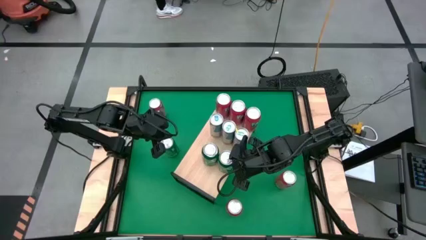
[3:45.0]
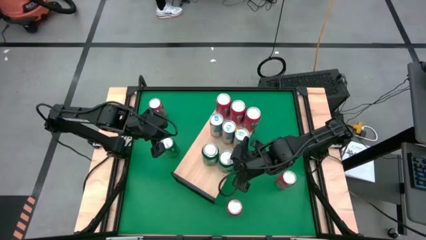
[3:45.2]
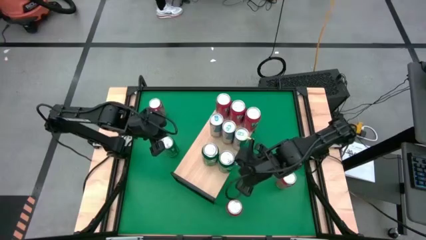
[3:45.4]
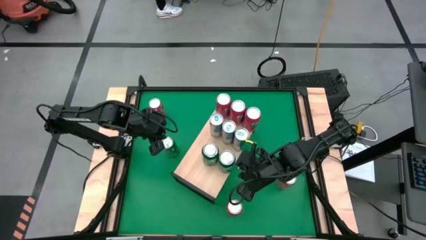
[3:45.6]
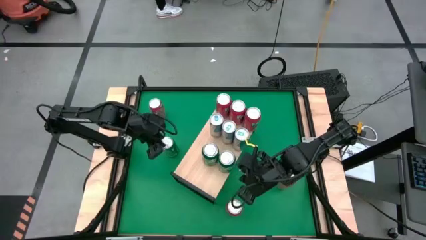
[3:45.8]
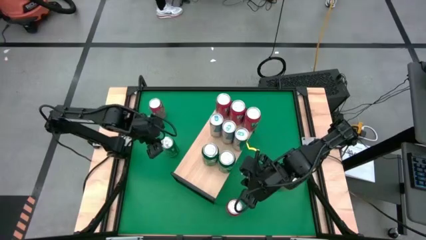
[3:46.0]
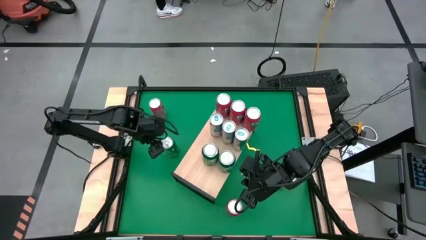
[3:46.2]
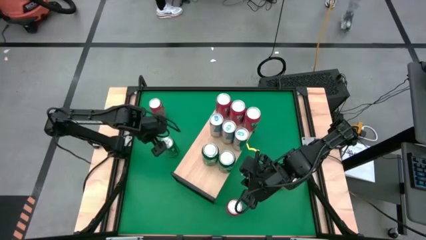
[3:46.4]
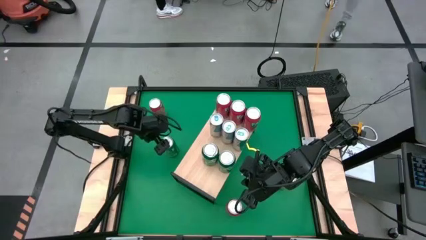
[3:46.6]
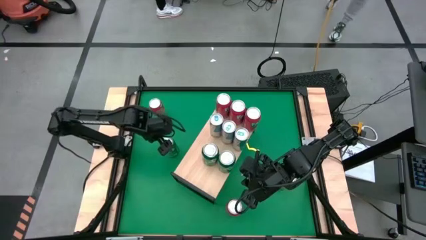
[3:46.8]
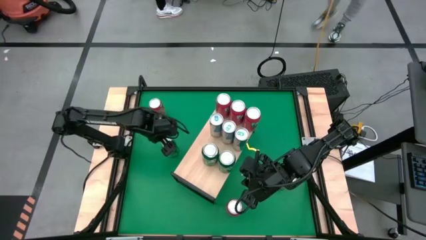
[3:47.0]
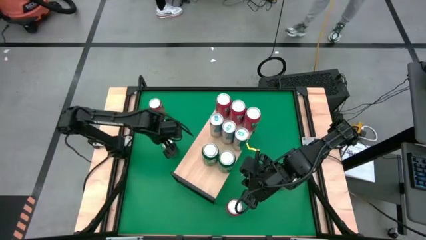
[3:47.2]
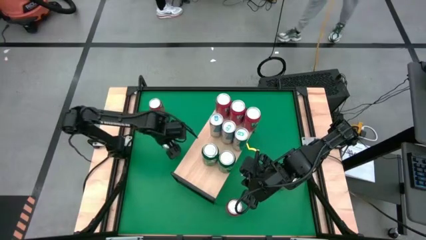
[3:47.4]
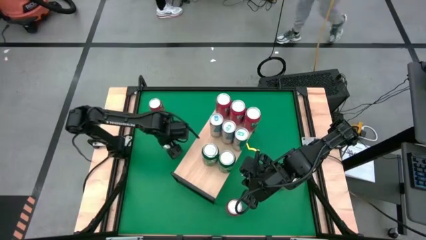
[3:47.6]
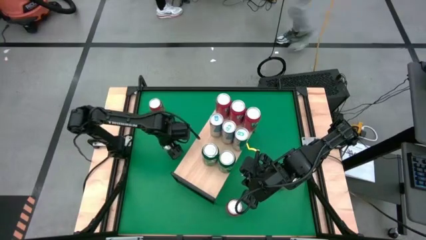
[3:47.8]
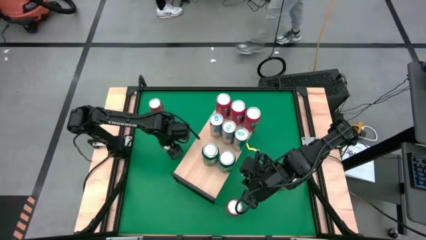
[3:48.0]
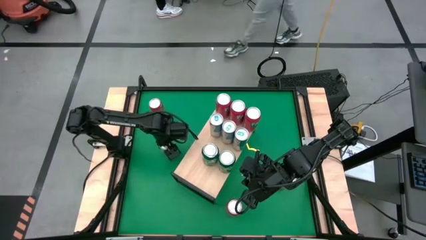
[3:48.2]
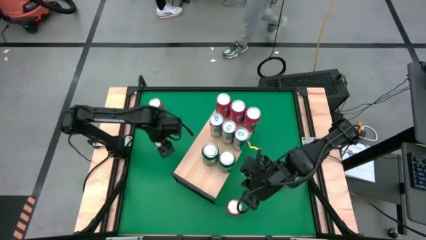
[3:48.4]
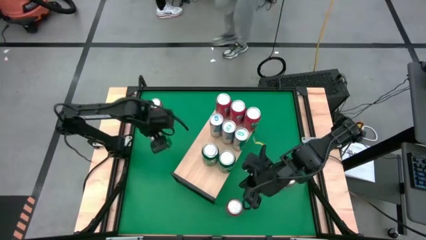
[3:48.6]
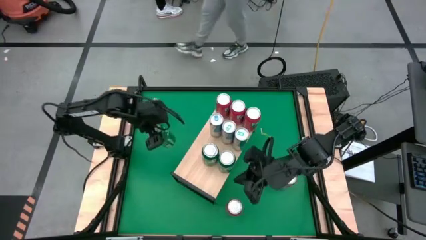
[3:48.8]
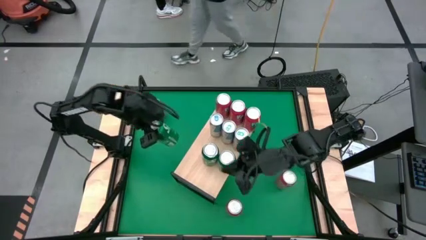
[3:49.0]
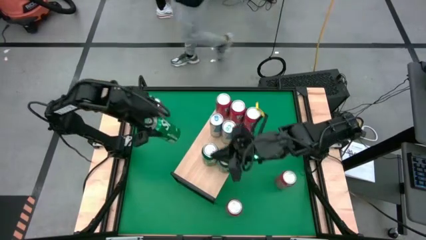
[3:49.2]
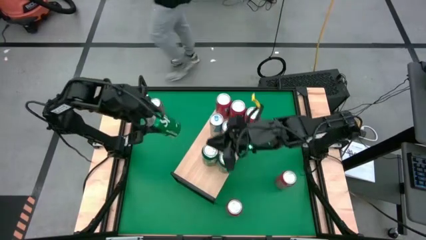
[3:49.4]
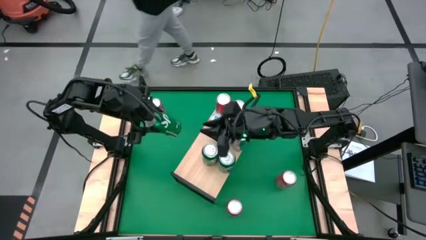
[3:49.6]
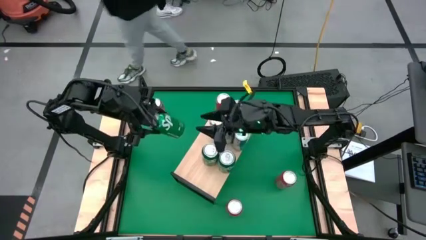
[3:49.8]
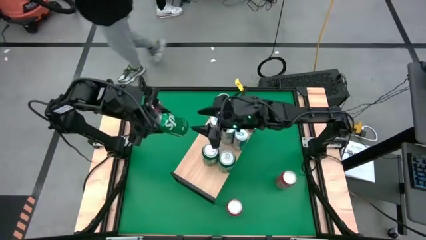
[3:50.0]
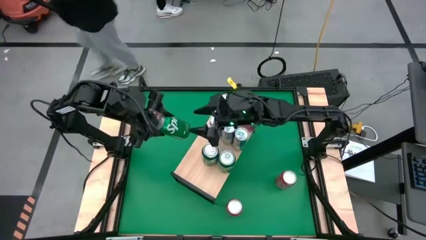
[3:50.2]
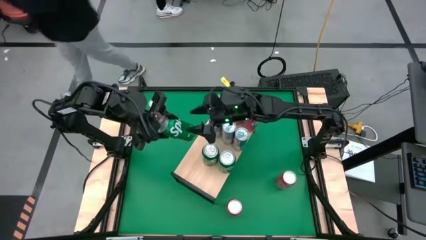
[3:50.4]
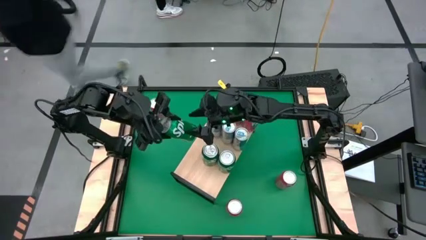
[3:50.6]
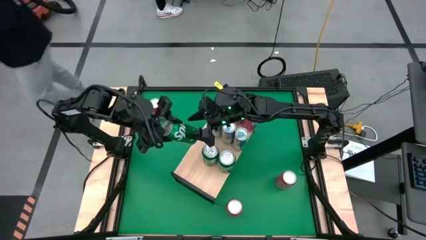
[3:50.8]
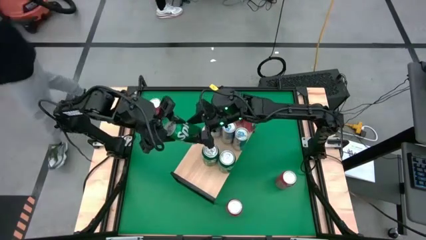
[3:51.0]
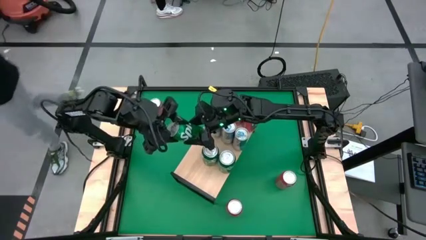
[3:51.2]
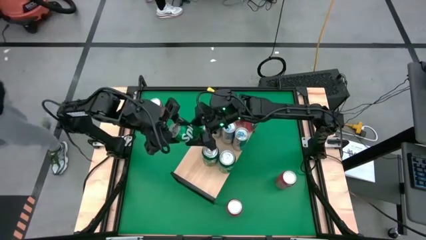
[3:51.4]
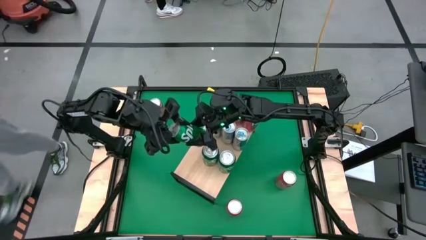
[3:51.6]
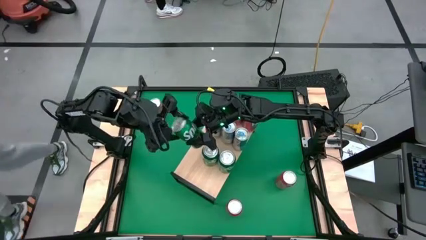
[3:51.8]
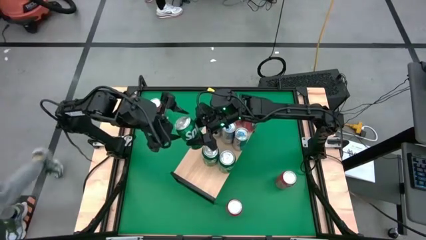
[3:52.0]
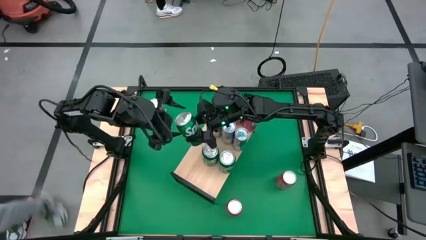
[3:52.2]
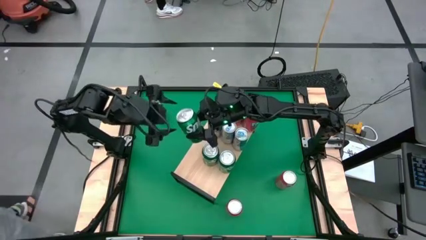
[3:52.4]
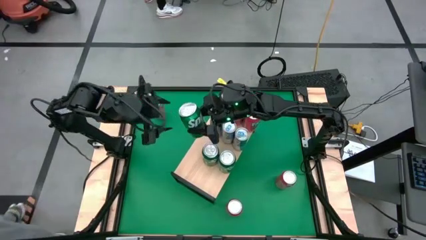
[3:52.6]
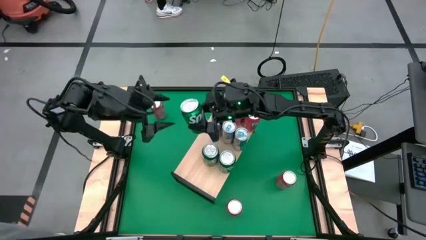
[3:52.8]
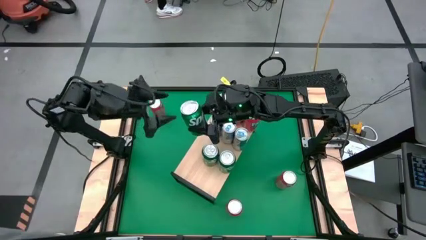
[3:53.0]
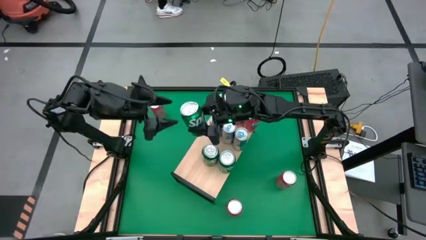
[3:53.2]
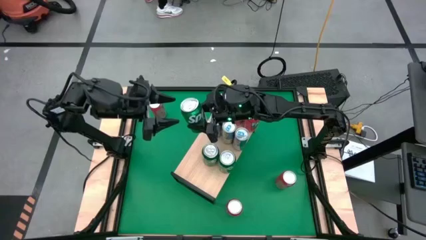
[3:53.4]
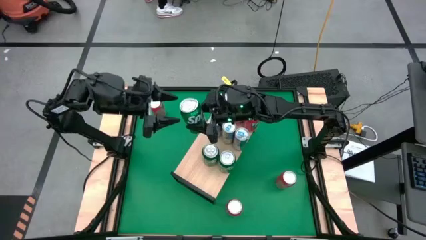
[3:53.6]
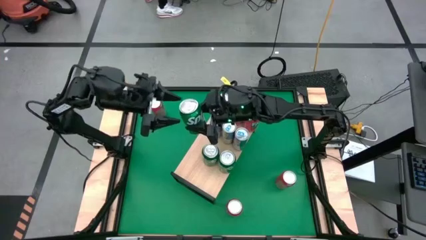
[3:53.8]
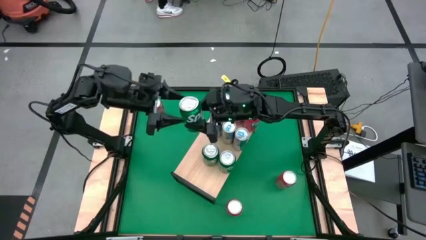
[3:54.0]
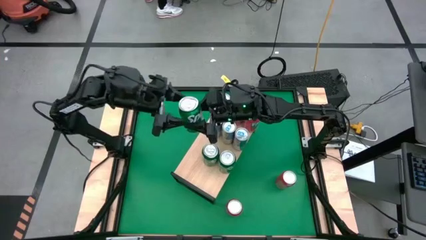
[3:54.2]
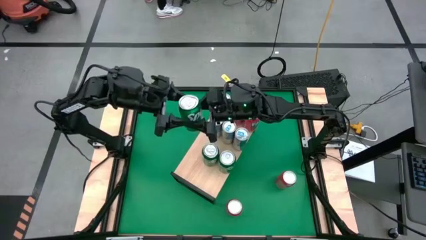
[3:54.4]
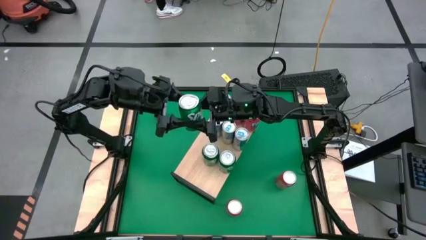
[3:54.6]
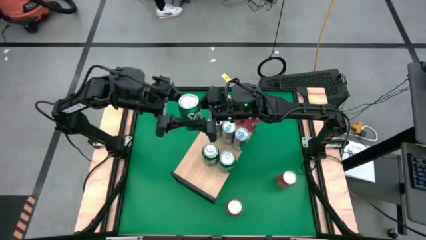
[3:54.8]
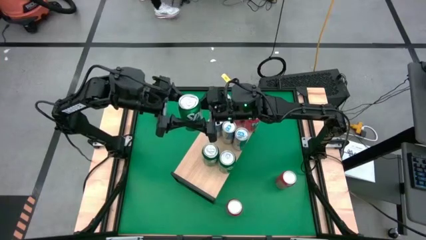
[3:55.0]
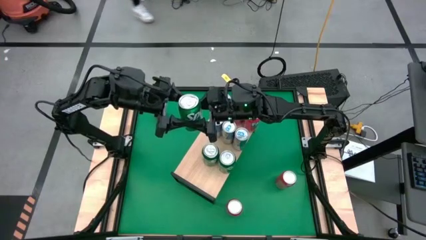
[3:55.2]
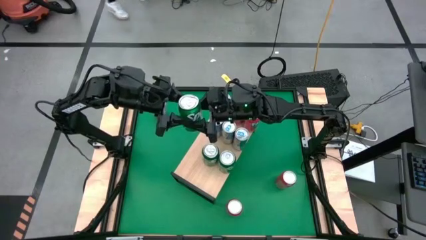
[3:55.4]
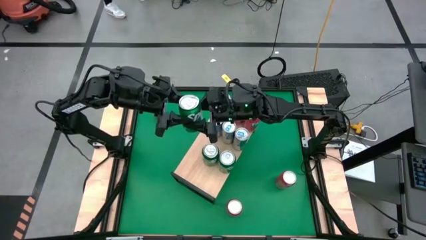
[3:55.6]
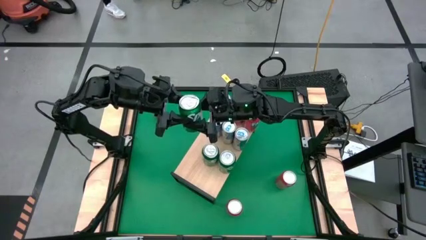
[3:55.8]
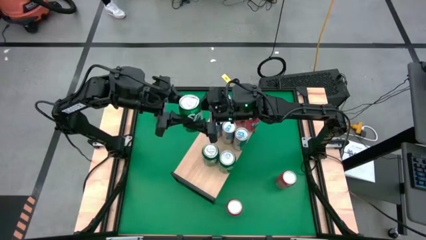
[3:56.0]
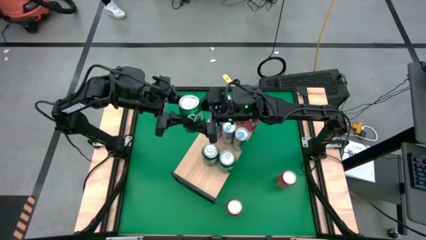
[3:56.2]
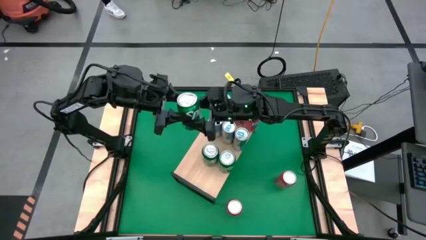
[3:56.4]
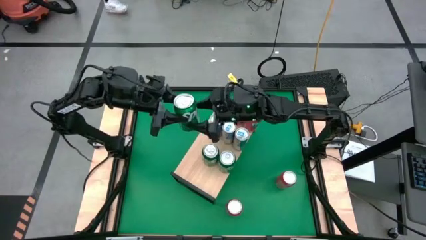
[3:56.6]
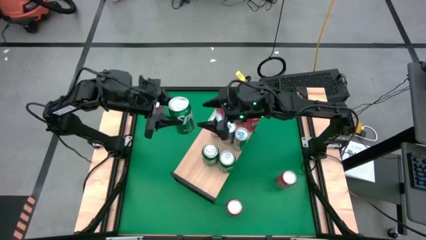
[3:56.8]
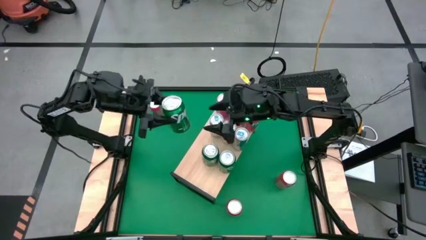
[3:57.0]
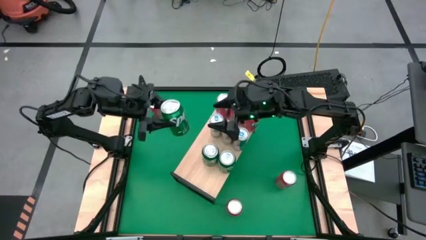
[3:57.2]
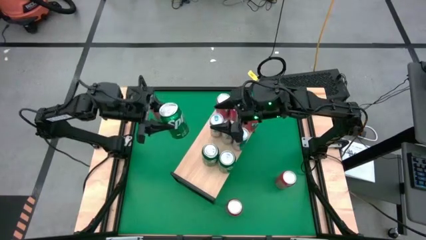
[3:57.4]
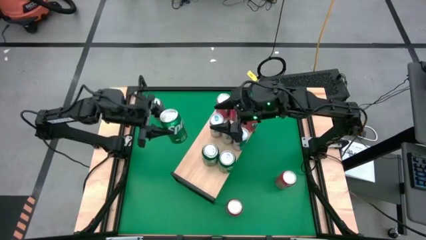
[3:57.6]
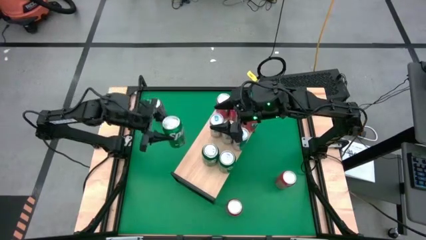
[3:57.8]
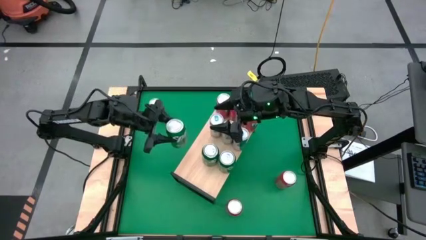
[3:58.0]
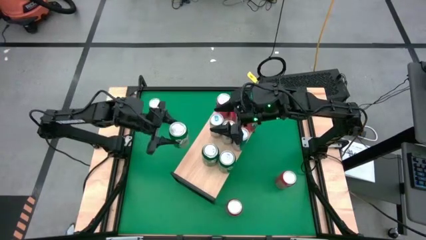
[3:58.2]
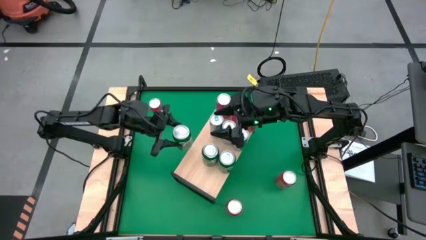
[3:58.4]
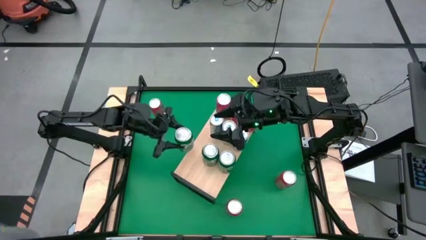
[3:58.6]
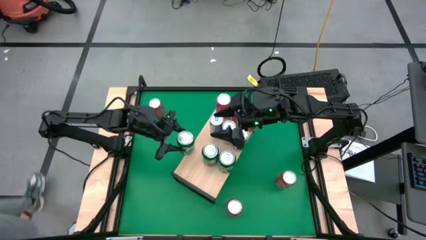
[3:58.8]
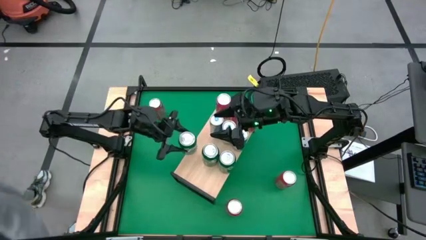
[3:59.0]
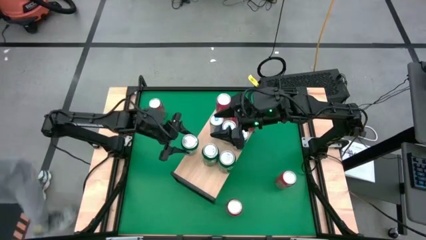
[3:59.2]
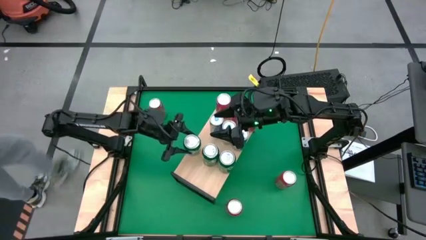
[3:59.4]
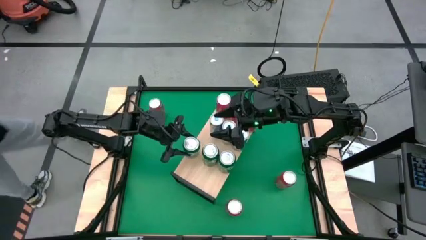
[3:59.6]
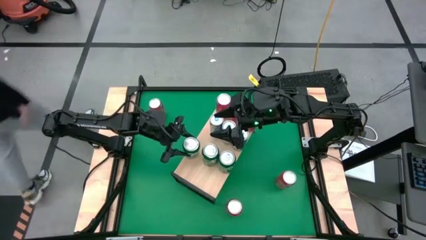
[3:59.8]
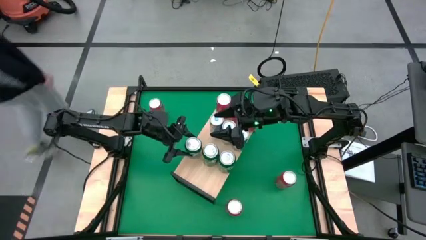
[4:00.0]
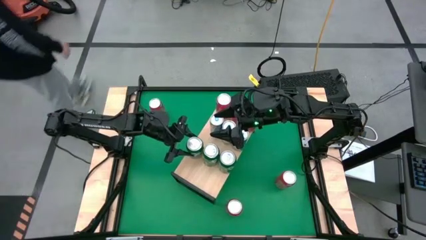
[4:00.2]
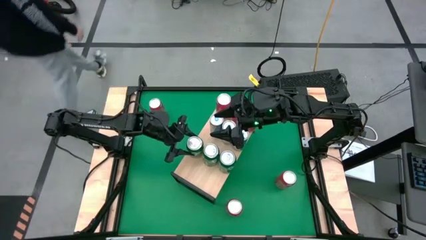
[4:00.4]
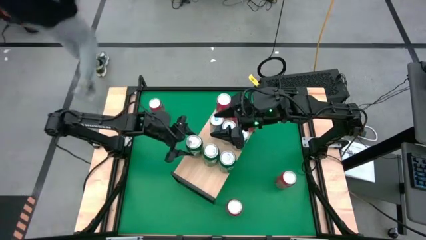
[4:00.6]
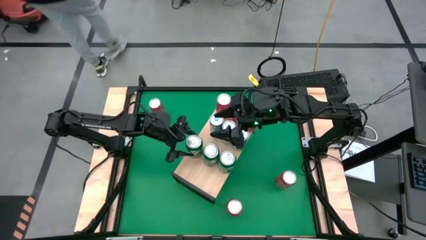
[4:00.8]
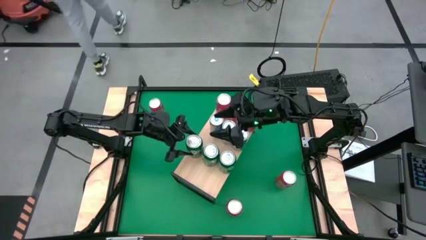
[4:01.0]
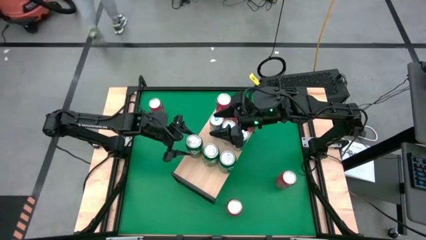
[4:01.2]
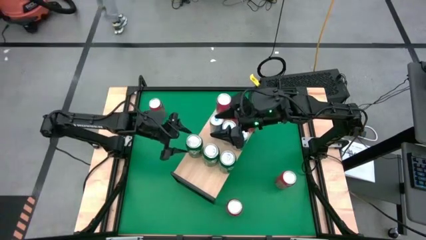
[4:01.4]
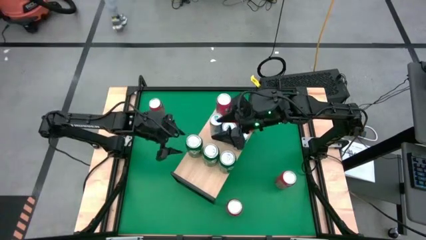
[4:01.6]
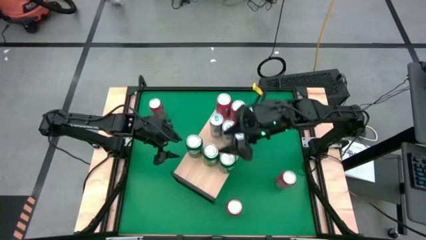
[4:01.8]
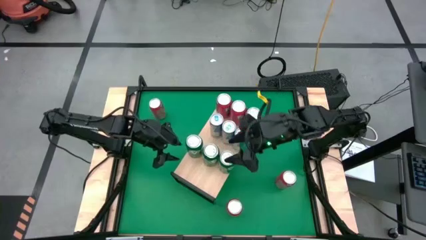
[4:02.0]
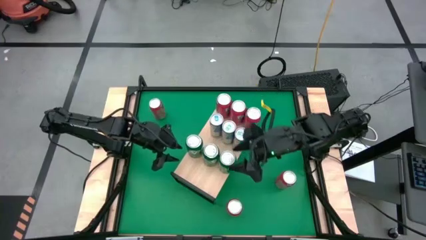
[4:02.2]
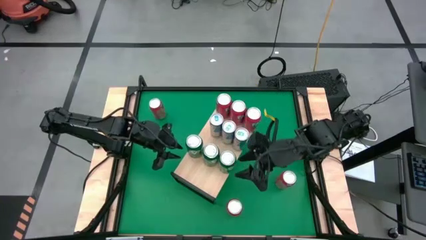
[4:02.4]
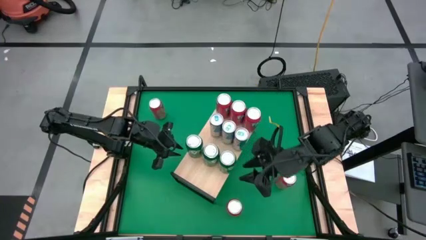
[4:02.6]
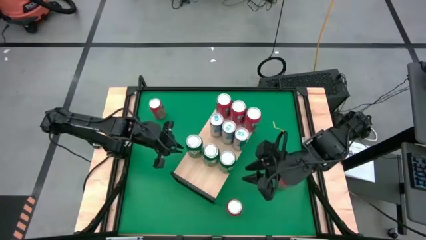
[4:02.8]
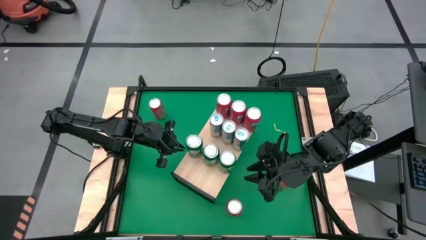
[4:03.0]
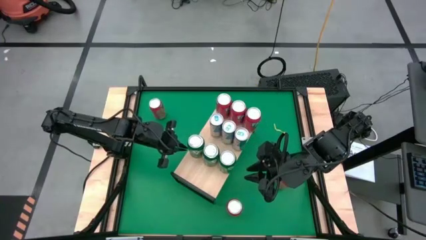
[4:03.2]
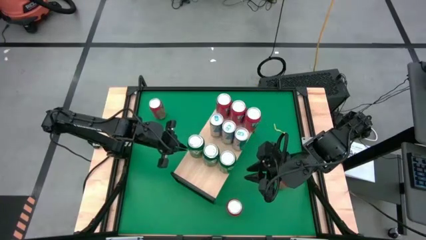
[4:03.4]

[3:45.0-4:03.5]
Task: Sort soda cans
Put the green soda can on the shelf and align it with the other green soda cans
